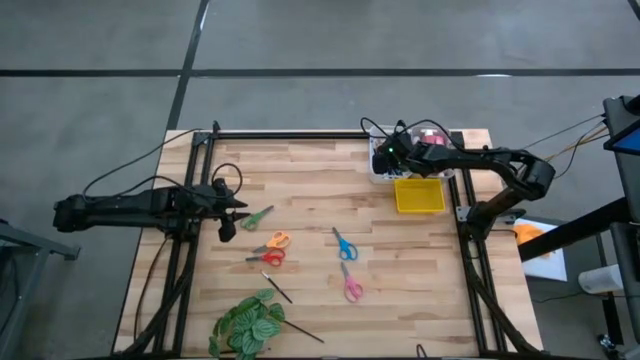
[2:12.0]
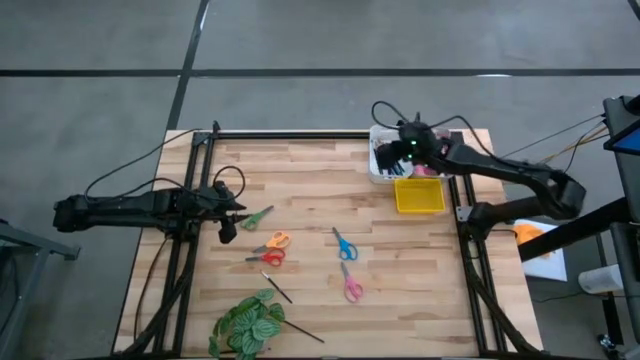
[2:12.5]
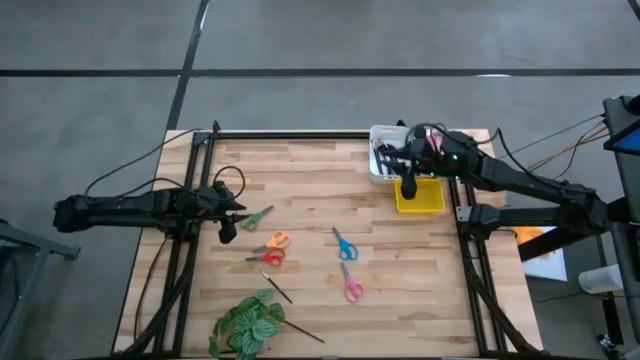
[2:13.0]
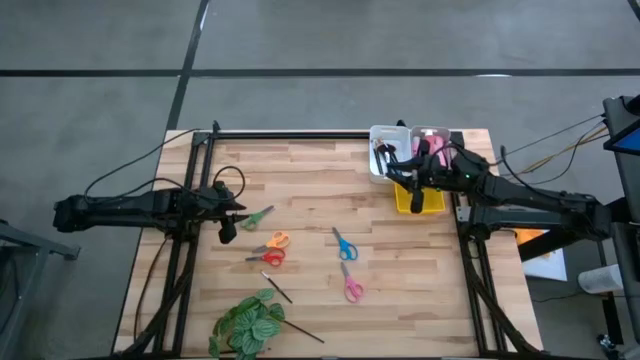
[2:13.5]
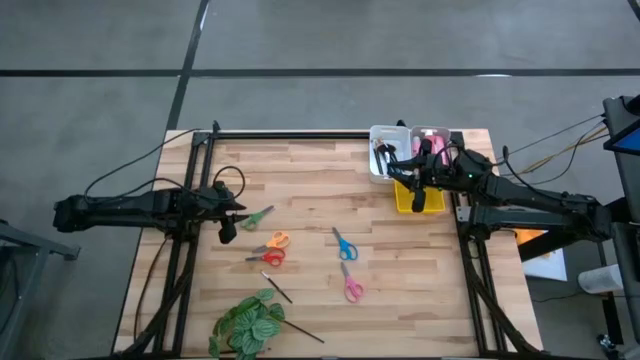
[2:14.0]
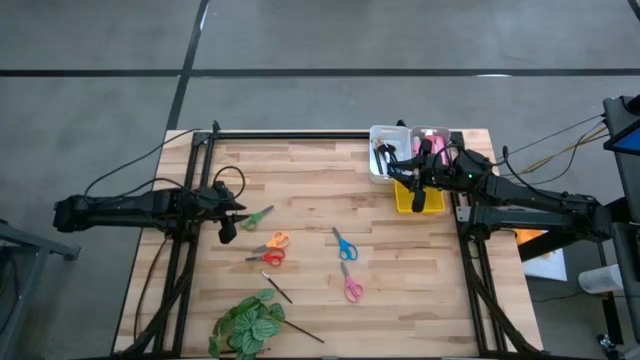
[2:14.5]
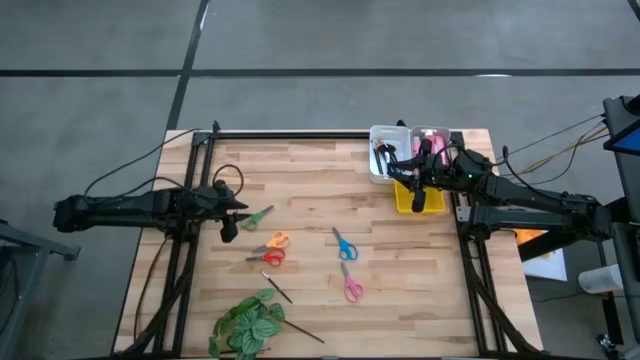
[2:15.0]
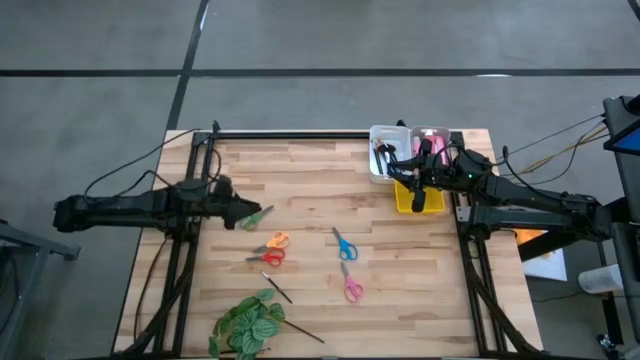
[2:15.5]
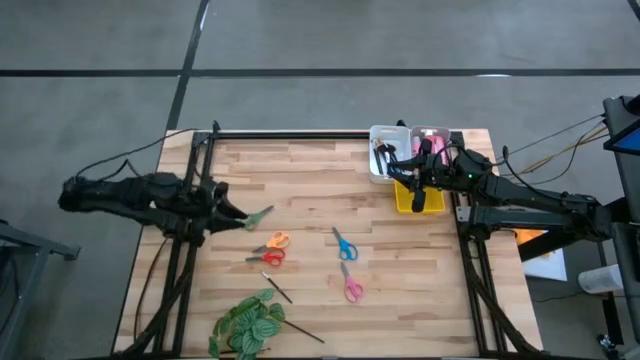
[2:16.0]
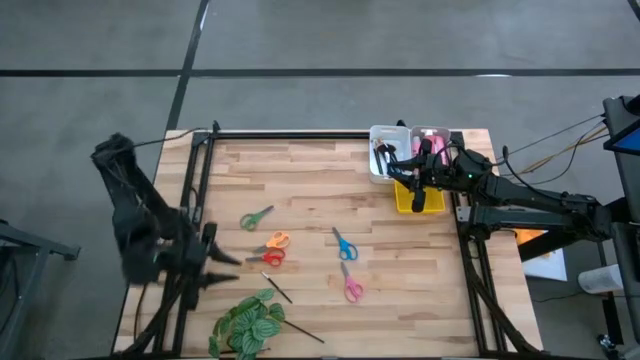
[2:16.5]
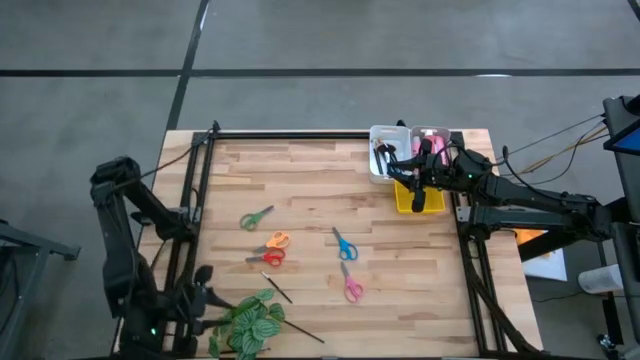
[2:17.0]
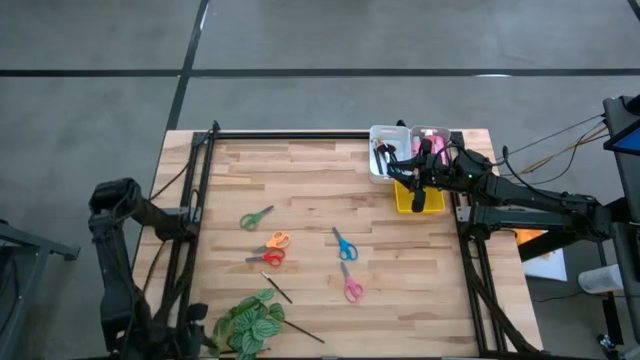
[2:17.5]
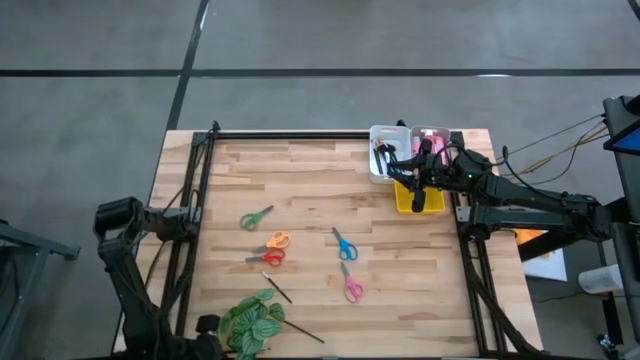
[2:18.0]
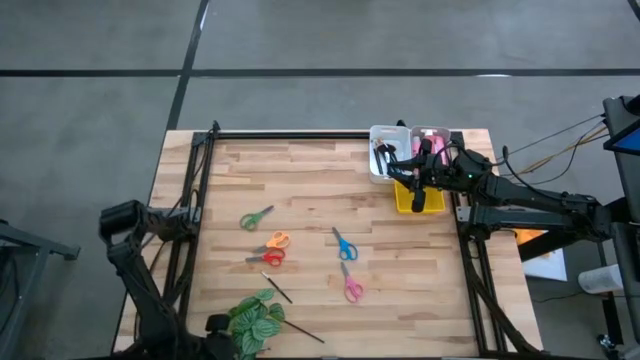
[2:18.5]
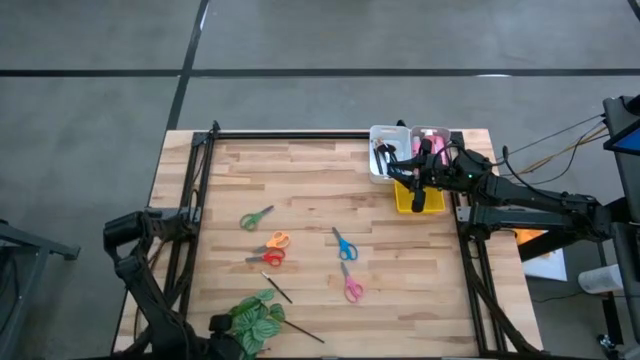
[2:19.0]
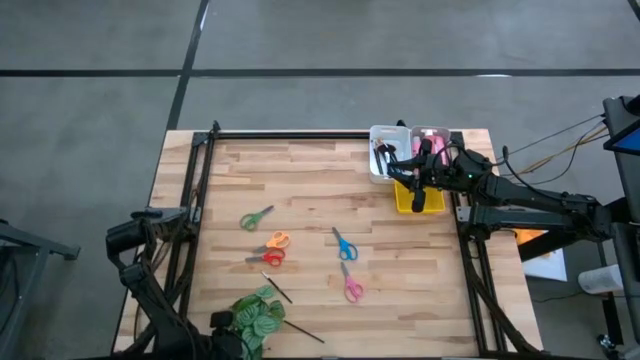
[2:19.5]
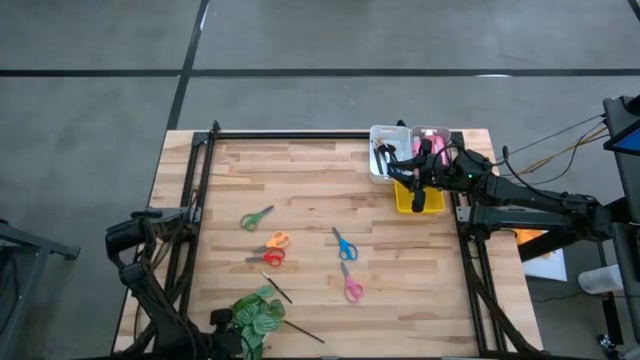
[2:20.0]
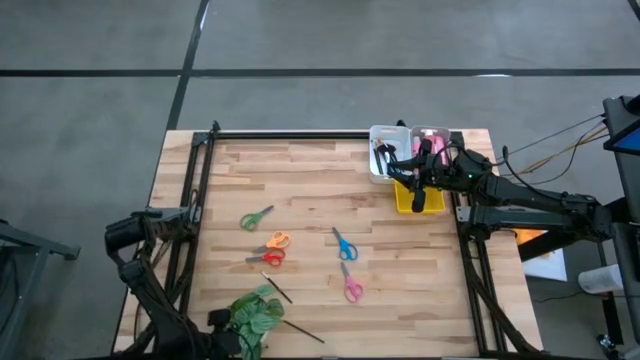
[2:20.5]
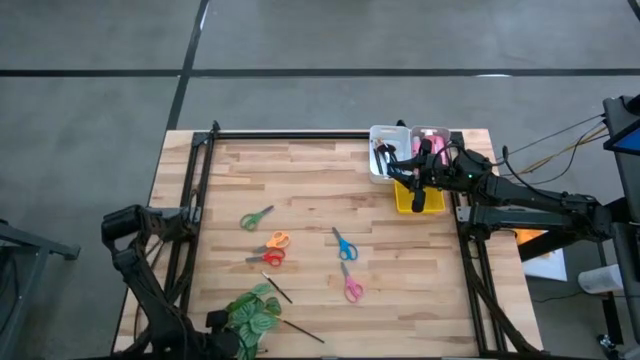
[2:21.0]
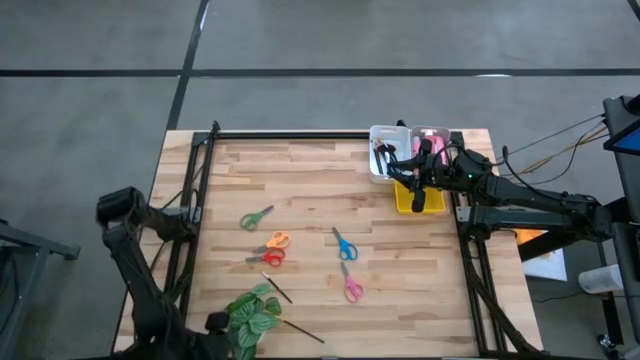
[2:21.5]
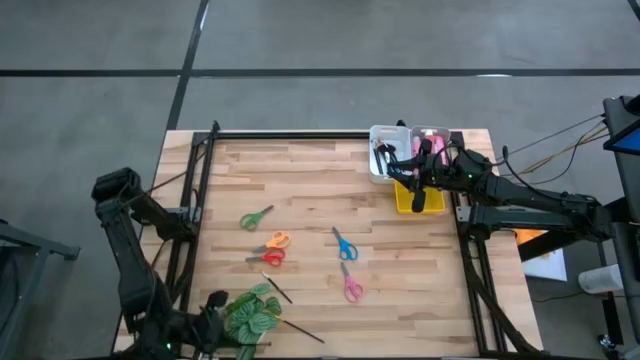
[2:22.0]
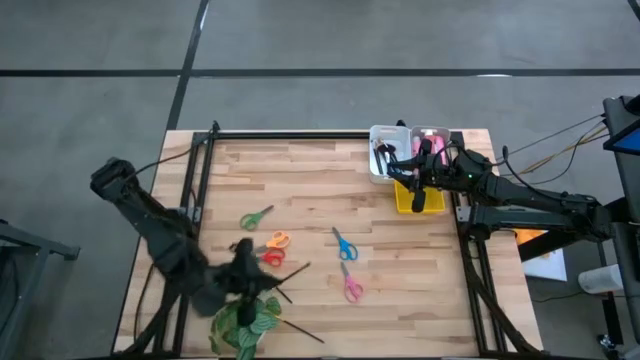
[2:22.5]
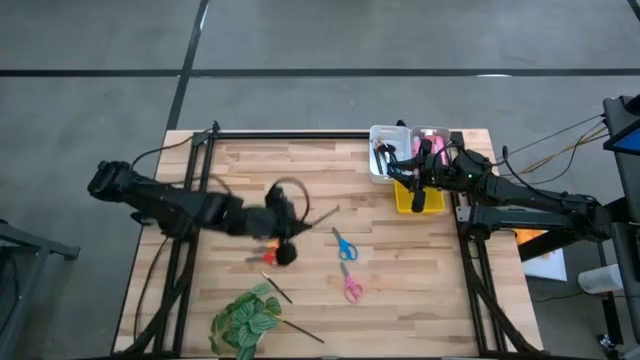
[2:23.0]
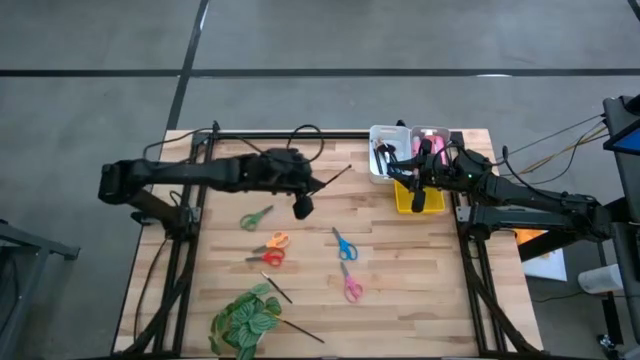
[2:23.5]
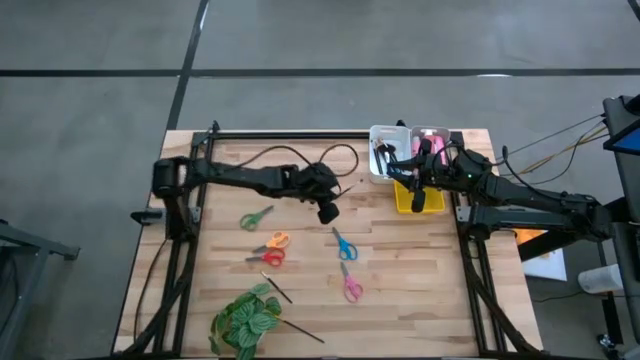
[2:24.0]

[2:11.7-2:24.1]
Task: Pick & Place Paint Supplies
Put the black paint brush into the white bin

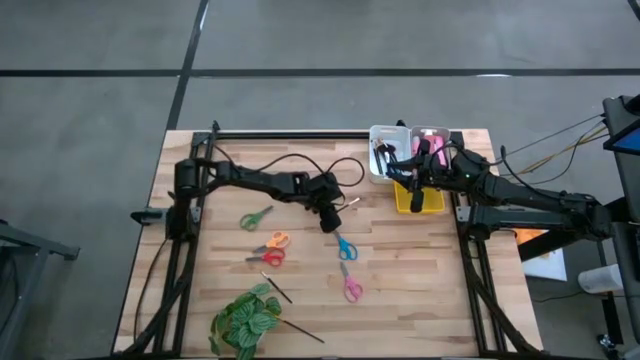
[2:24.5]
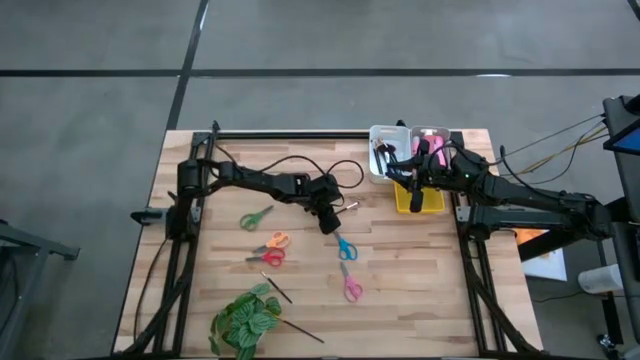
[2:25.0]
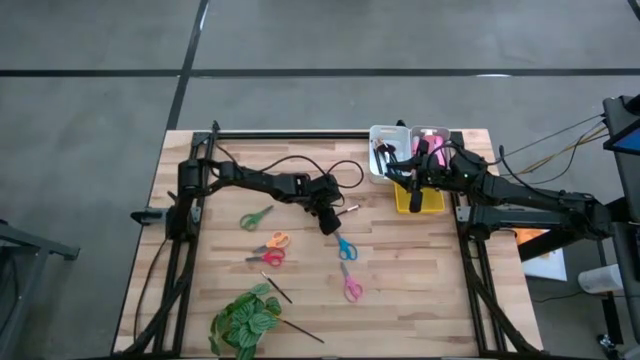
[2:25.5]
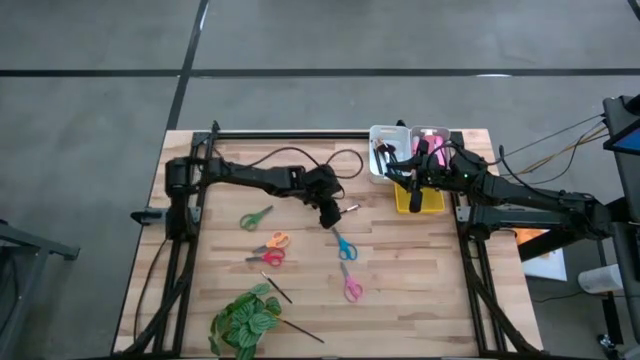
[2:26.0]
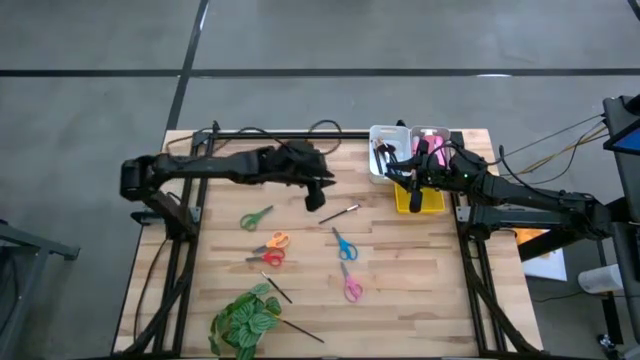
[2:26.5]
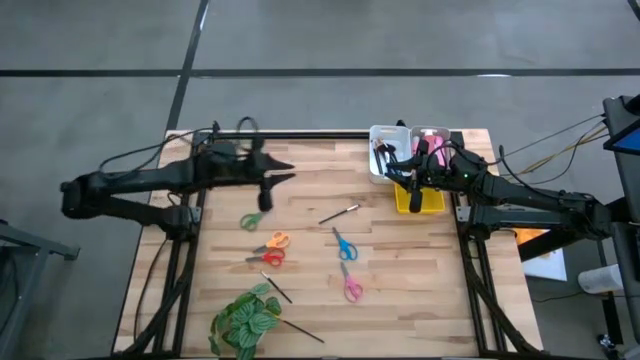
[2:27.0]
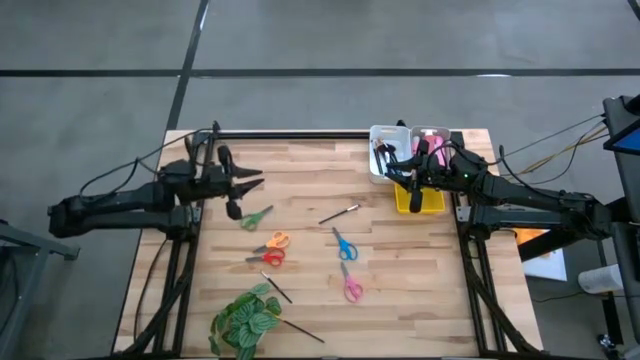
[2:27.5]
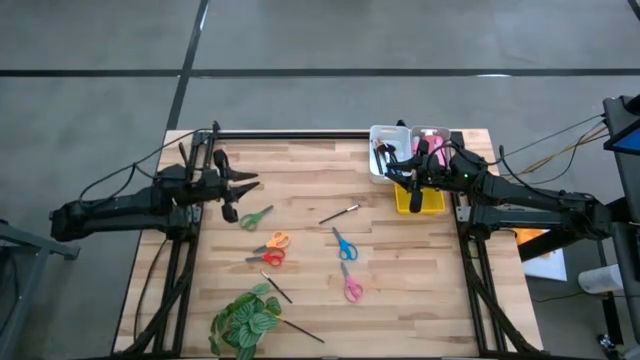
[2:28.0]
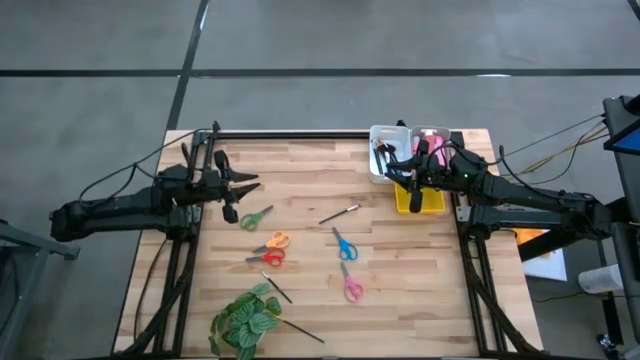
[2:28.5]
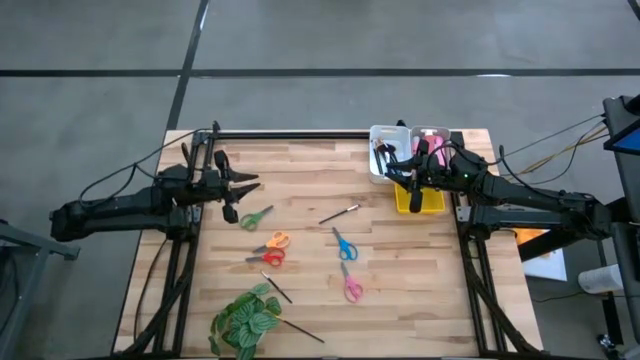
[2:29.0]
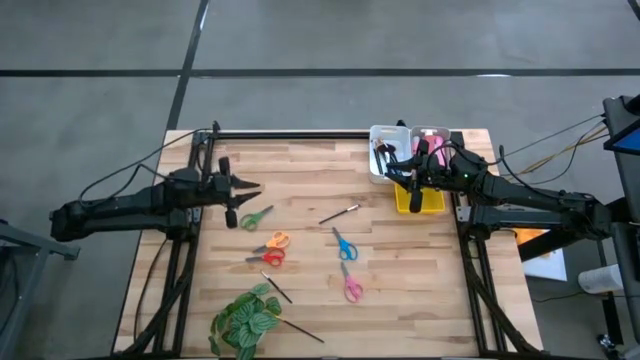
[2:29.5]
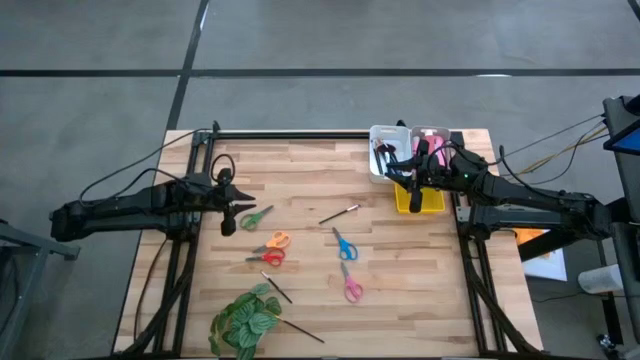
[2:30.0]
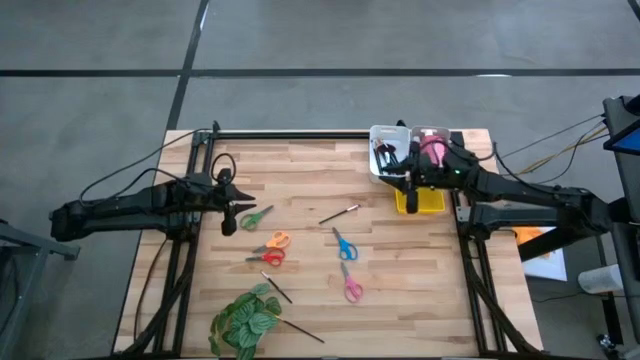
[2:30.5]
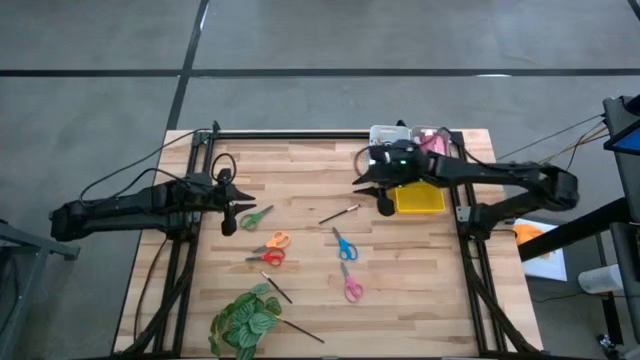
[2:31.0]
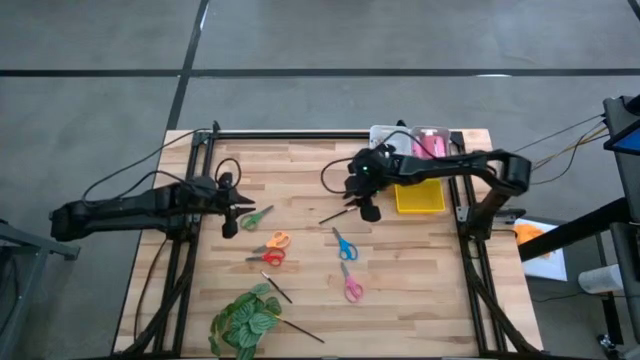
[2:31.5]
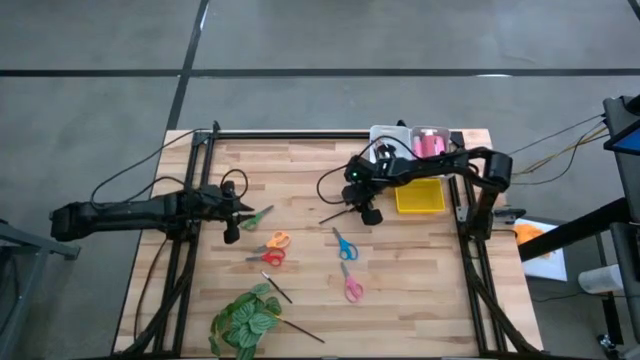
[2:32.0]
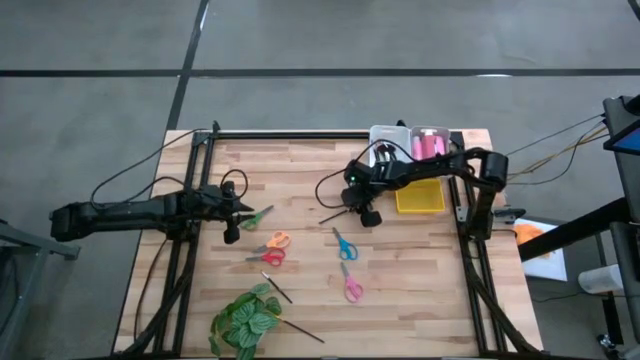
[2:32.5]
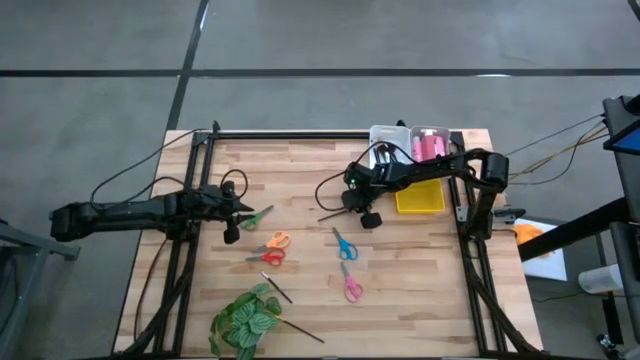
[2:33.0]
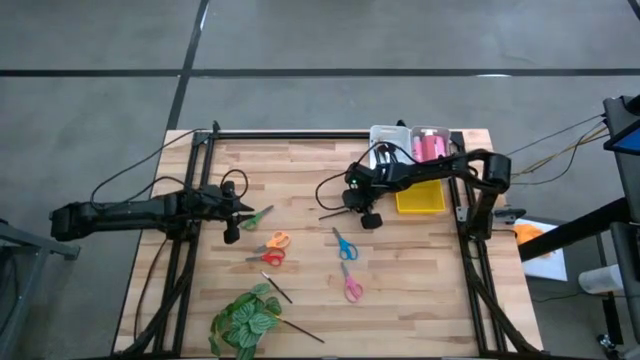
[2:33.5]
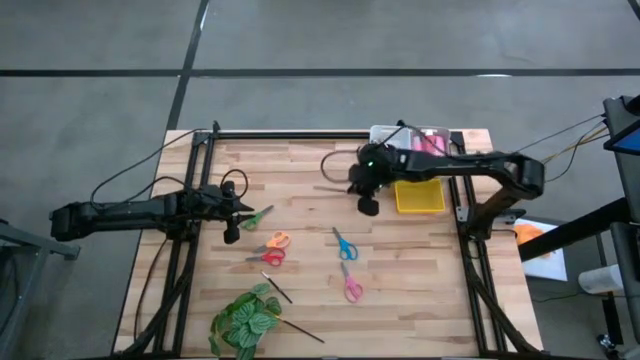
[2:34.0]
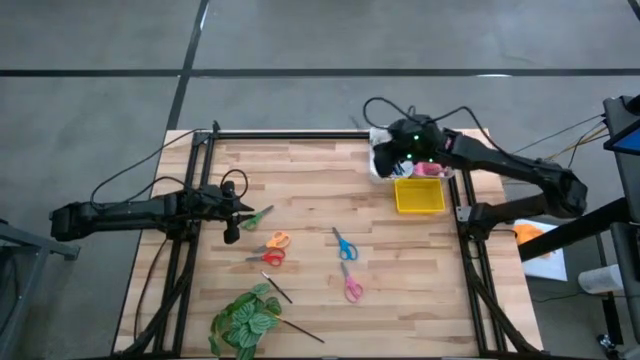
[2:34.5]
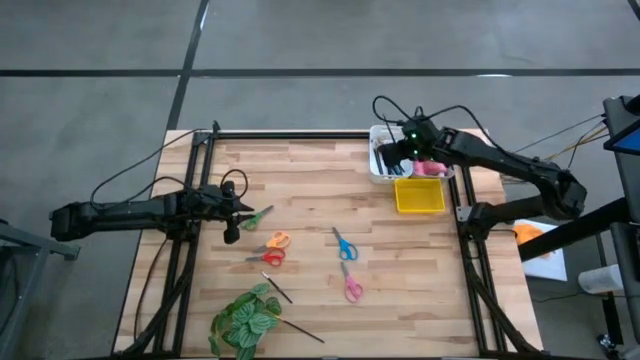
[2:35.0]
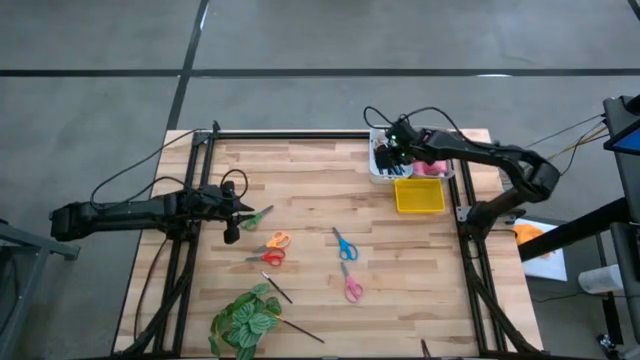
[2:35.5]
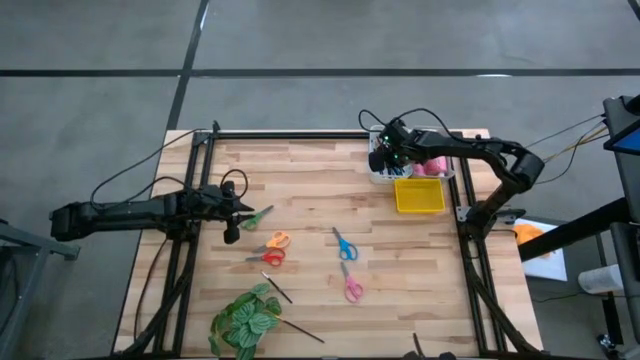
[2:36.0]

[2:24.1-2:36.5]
Put the black paint brush into the white bin
